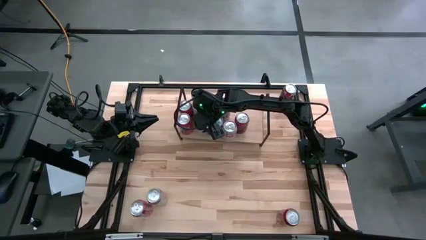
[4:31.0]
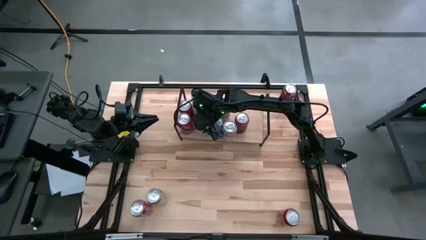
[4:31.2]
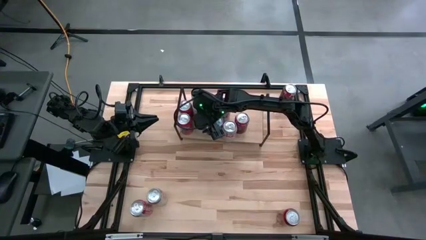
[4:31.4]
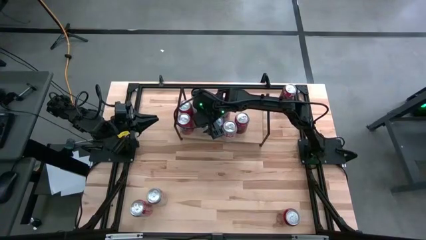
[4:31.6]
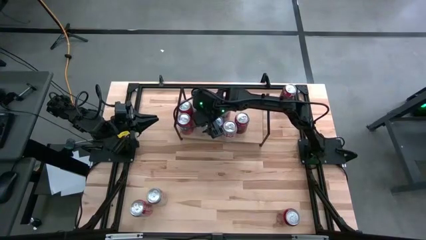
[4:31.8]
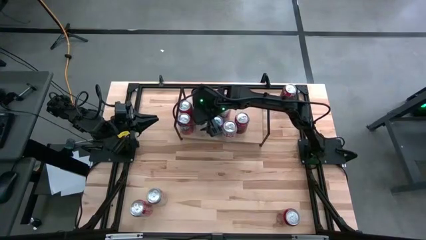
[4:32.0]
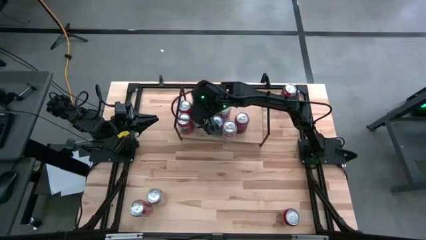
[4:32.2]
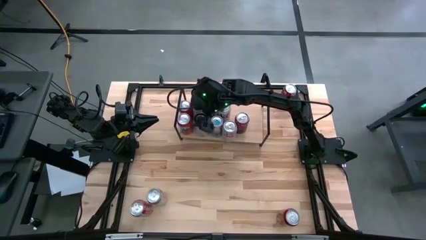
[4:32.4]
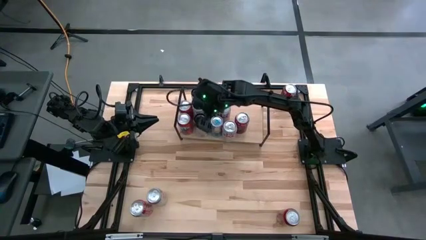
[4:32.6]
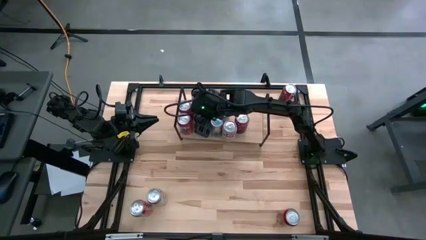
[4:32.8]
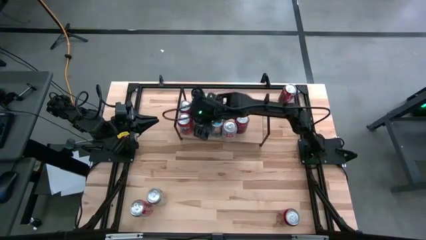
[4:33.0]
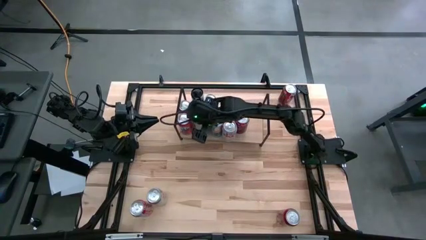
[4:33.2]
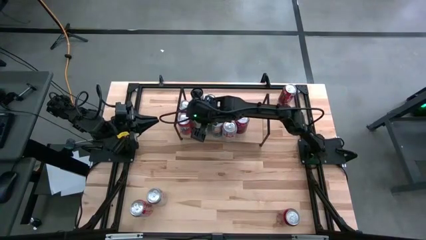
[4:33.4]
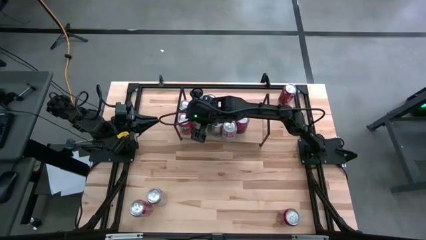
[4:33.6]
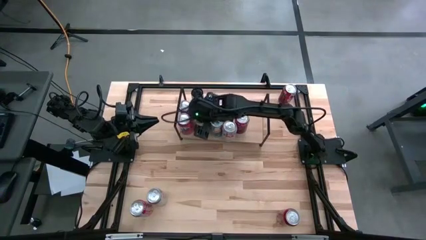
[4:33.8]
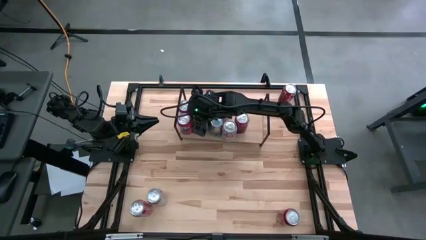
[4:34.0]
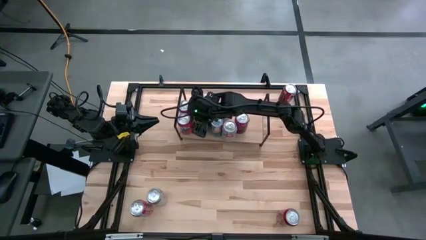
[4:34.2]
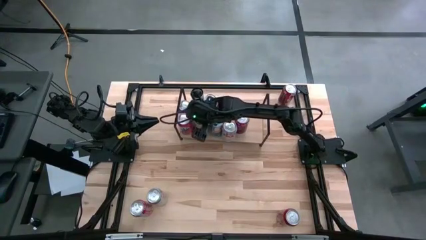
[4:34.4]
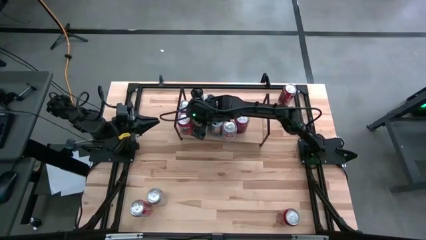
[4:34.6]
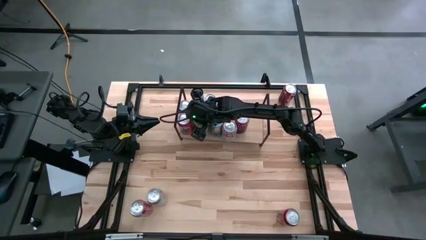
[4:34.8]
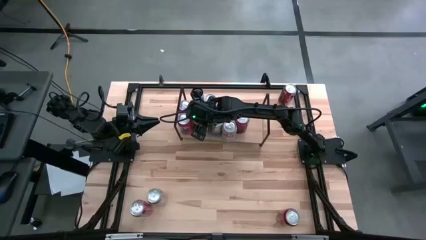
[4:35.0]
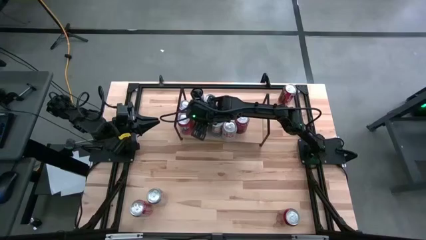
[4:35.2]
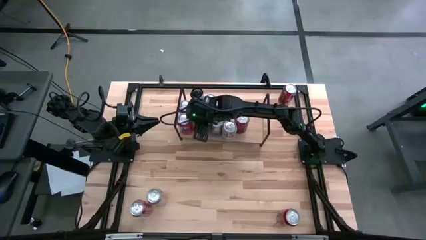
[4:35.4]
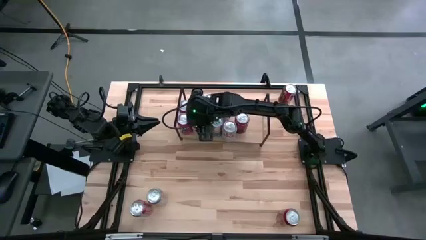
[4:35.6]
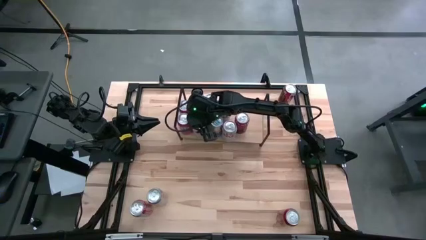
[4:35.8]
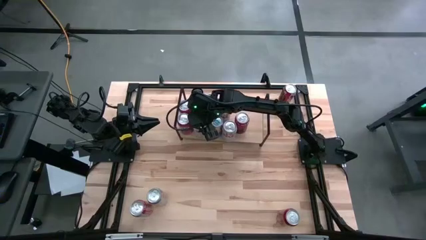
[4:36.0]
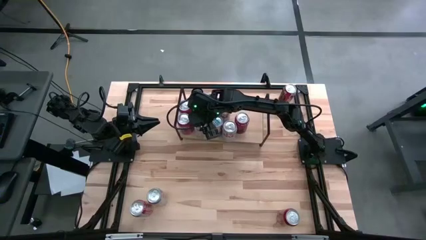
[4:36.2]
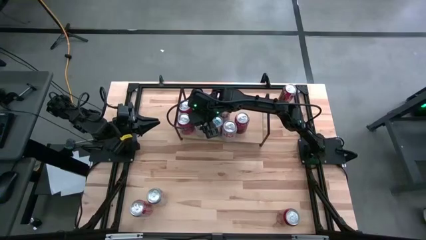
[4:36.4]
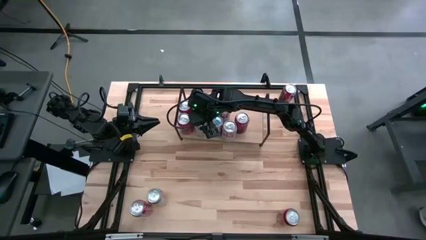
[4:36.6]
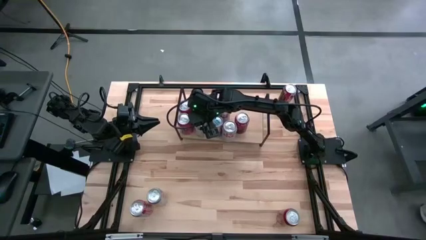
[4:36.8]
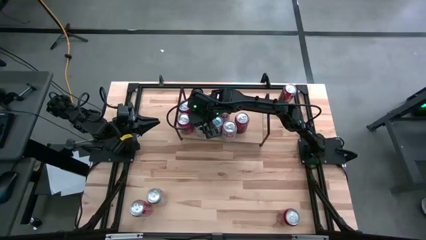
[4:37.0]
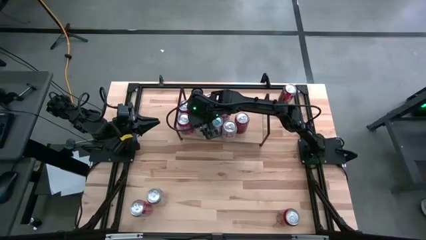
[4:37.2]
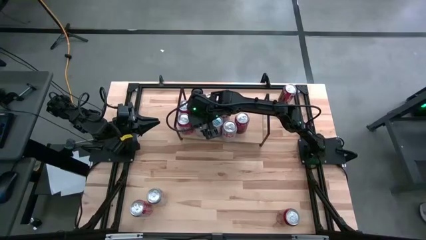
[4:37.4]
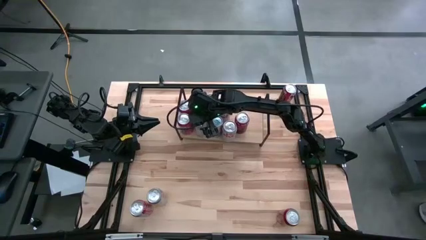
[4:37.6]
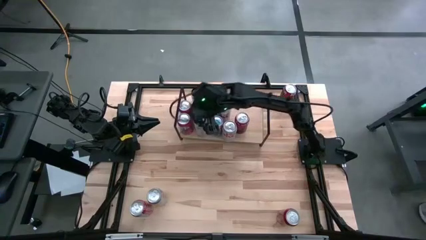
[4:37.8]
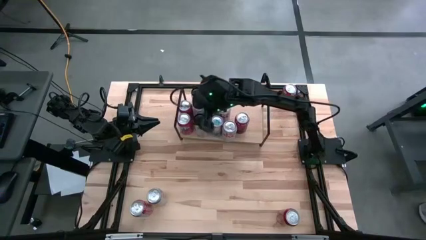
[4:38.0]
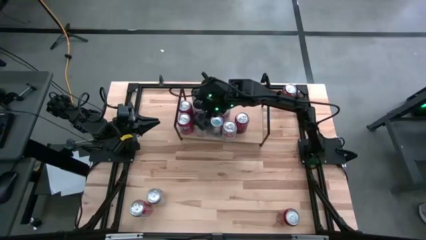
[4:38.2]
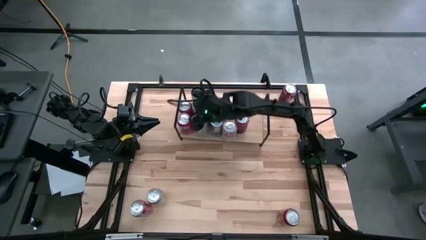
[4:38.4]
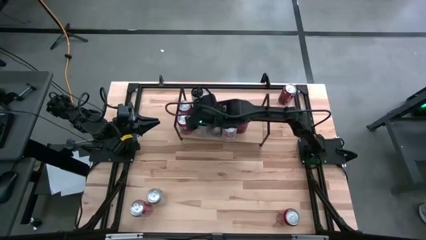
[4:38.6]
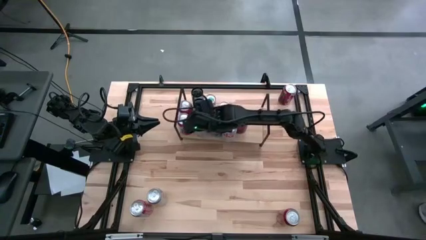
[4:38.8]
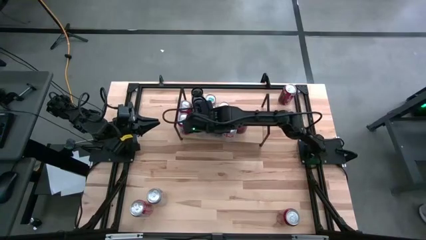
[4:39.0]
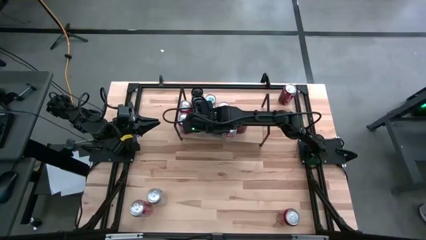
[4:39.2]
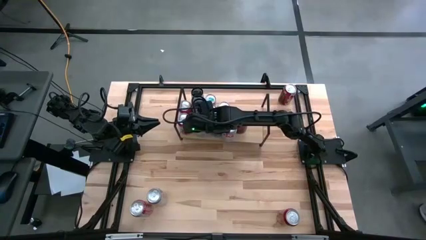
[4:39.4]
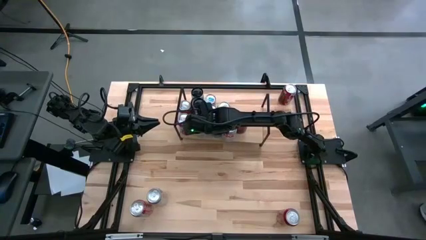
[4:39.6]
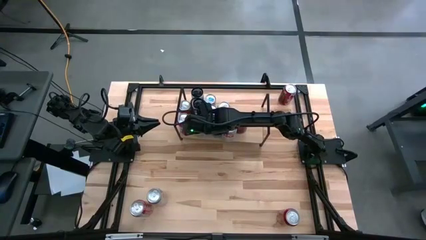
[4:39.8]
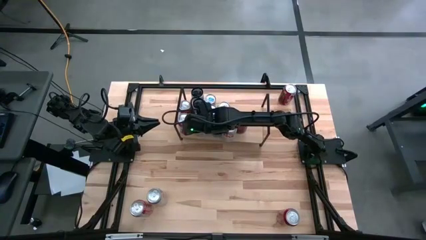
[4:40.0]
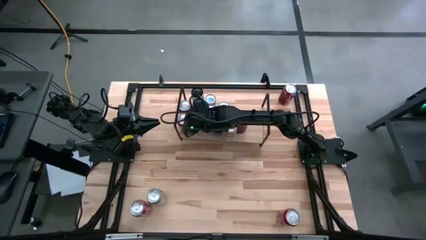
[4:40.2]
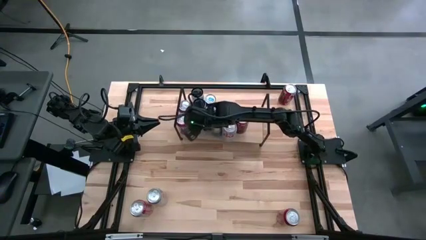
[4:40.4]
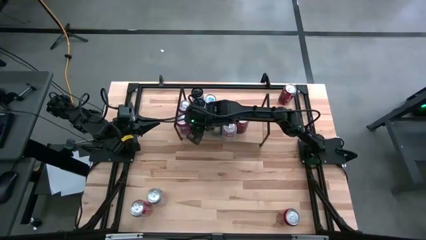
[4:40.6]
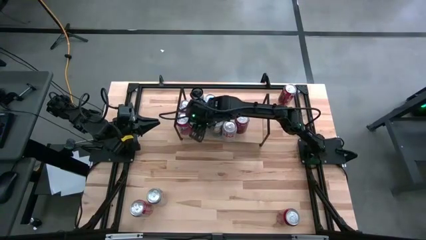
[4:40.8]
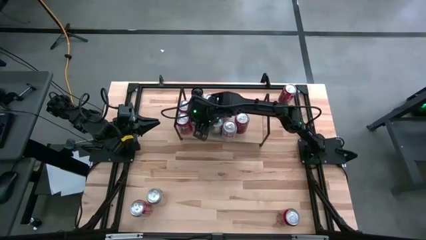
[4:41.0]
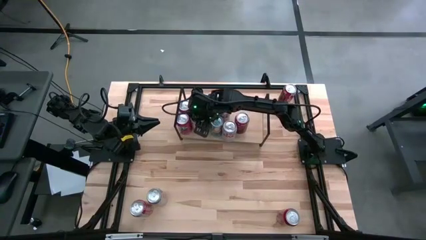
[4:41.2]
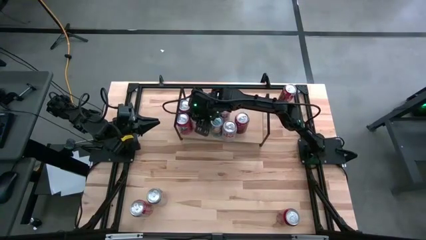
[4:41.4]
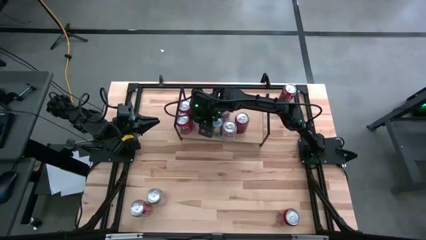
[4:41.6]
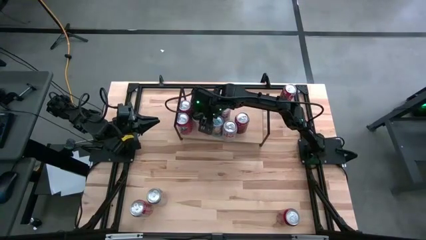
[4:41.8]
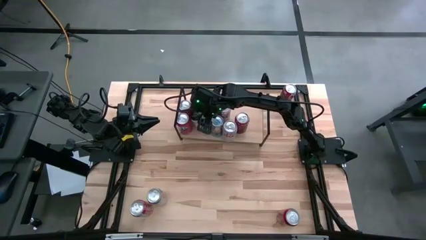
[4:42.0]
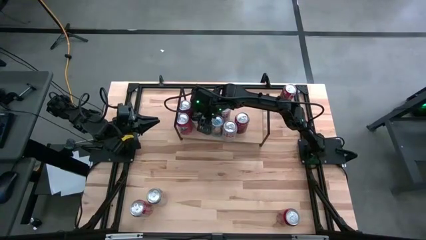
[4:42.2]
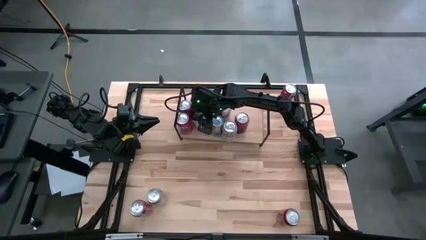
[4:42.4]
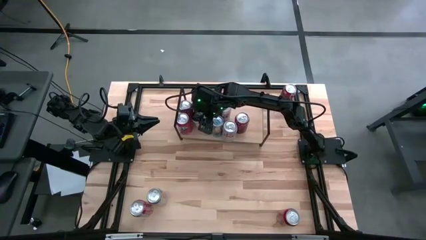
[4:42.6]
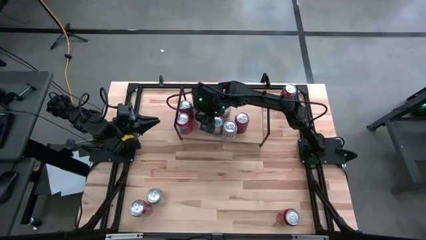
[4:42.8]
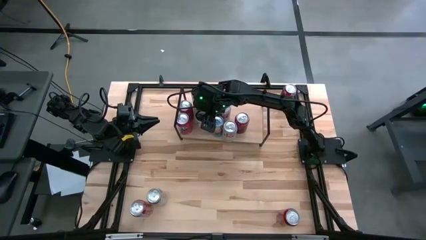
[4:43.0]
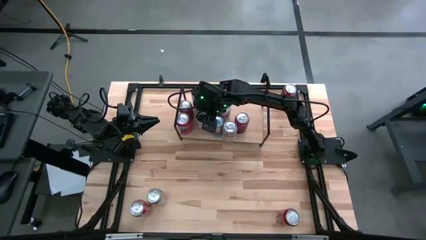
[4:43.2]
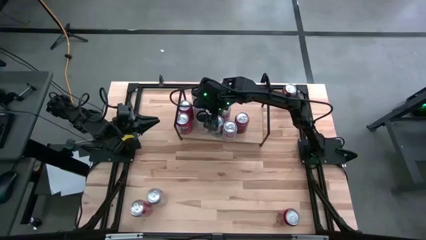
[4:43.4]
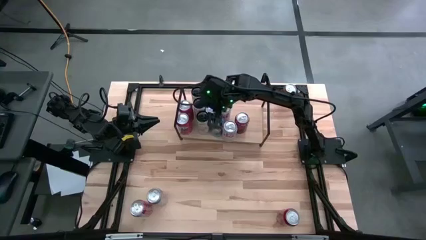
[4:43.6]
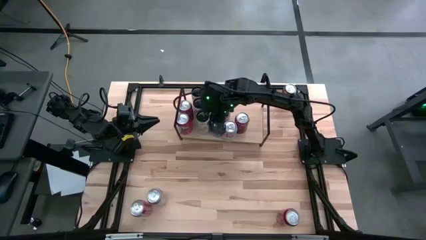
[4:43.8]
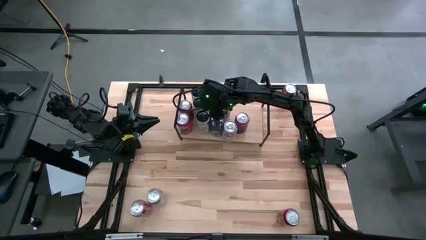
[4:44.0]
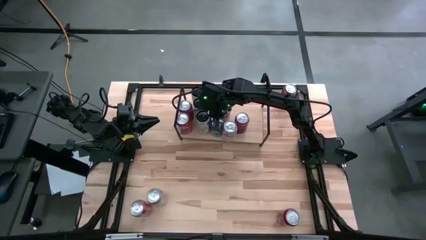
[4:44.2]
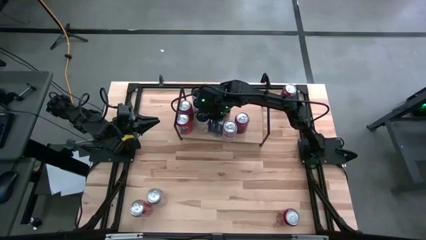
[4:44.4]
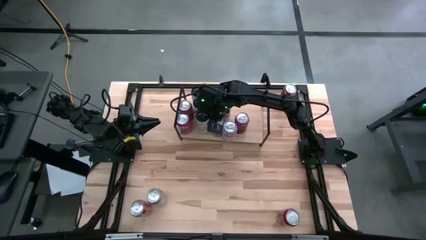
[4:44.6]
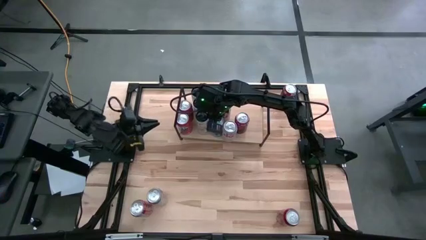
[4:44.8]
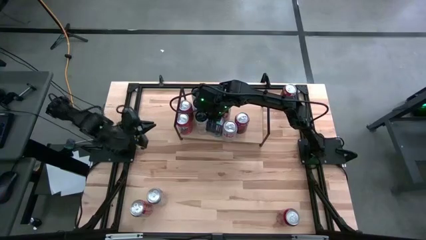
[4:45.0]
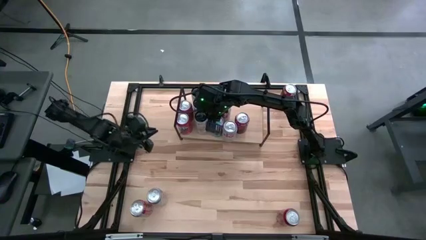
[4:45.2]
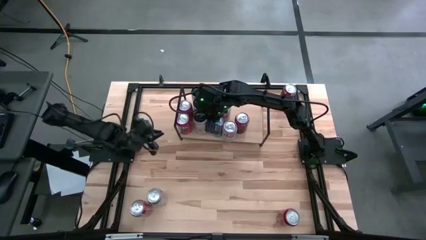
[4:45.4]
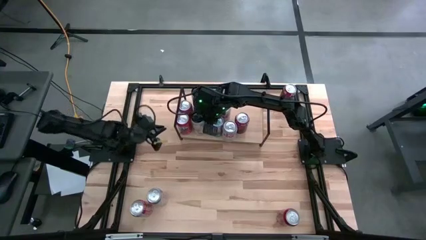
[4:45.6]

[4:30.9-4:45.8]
Task: Place canned beverage on shelf
Put the white-pink soda can on the shelf aligned with the other white-pink soda cans

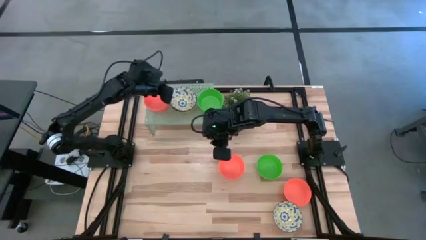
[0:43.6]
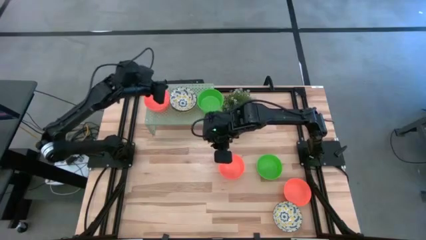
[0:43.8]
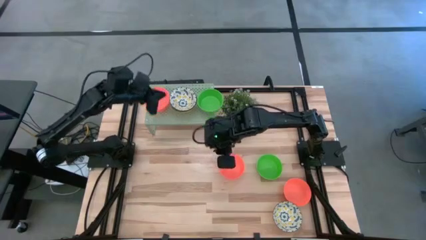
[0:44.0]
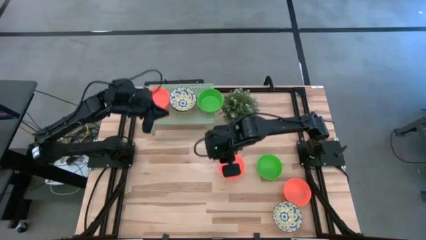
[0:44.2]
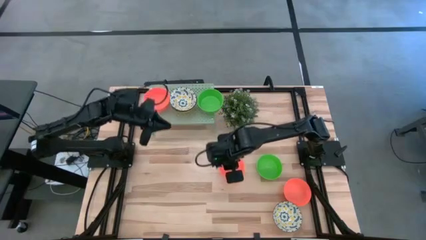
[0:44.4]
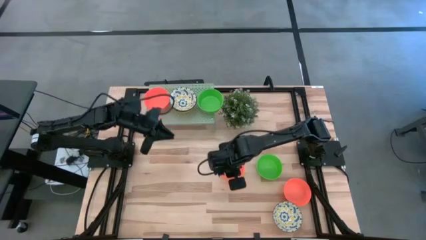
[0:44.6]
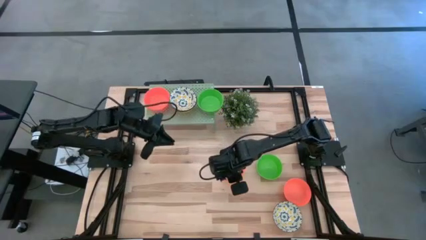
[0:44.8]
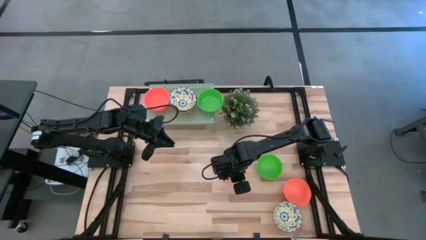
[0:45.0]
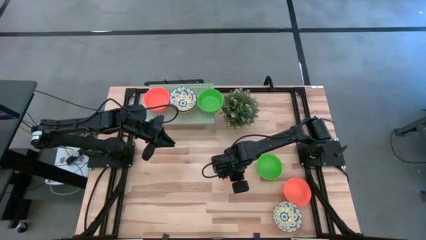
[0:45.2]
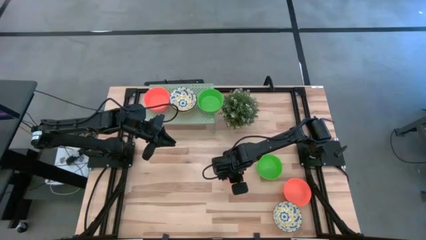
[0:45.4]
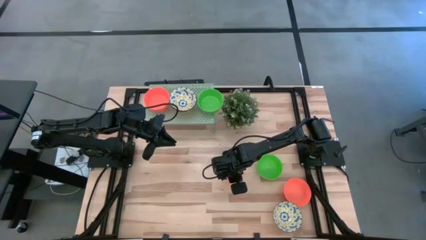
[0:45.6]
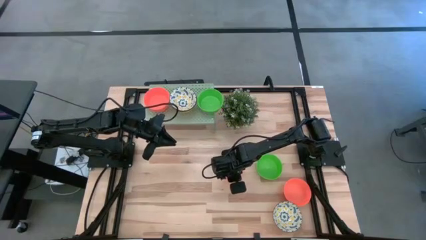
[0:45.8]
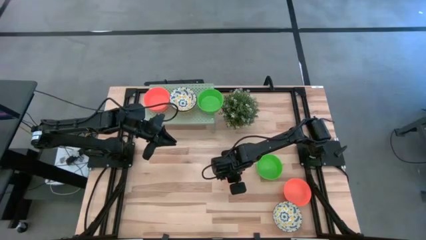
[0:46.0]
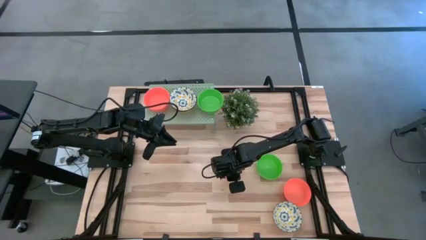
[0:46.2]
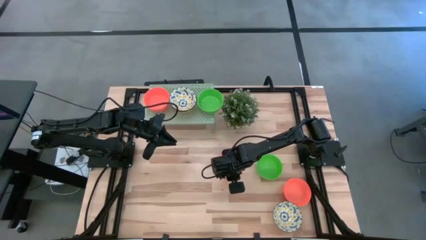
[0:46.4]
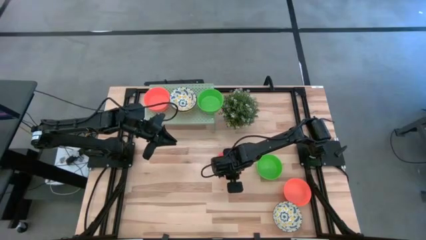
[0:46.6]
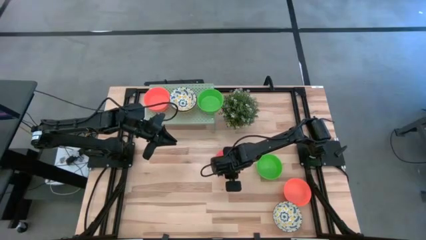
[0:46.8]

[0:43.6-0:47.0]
Task: Pick & Place Mini bowls
Stack the orange bowl on top of the stacked orange bowl on the shelf
